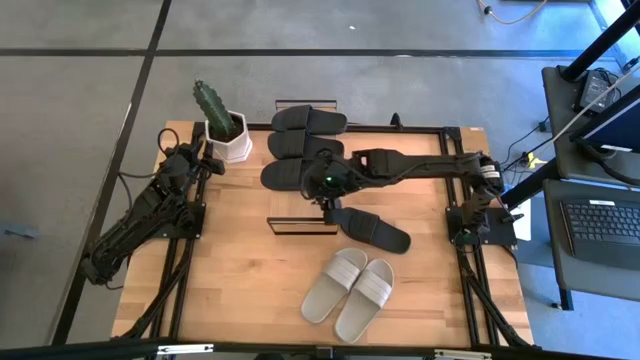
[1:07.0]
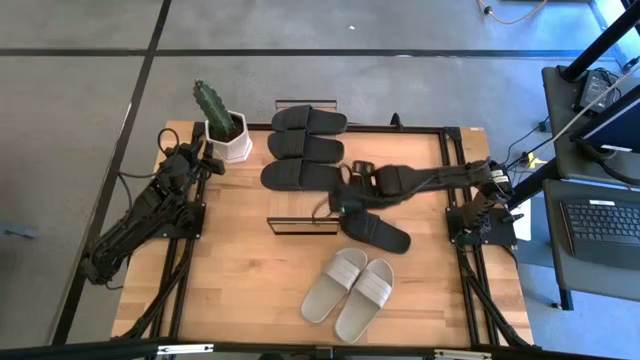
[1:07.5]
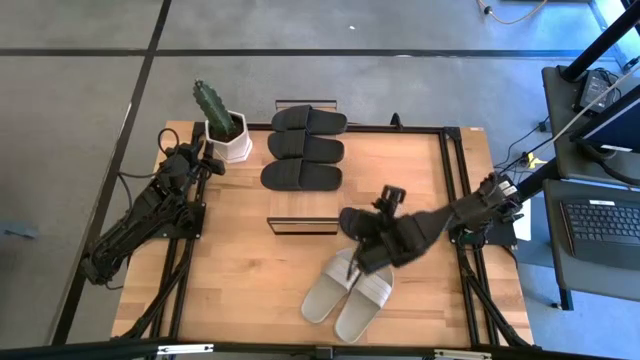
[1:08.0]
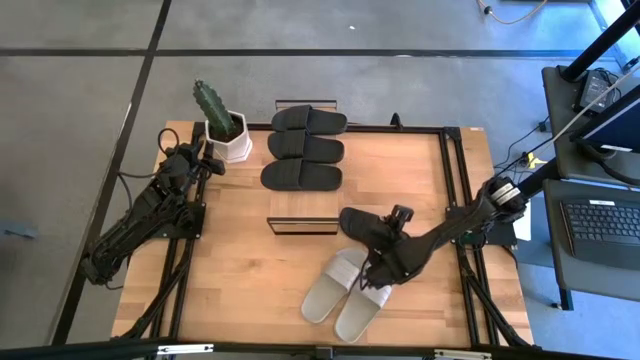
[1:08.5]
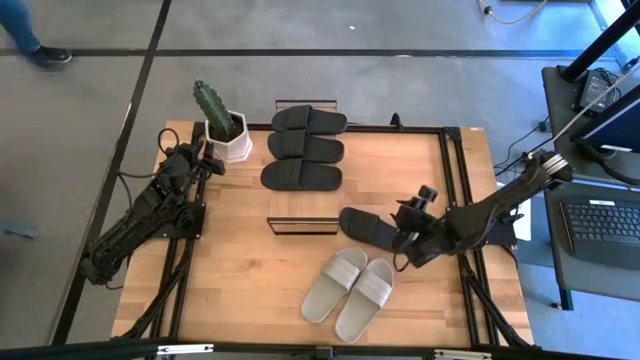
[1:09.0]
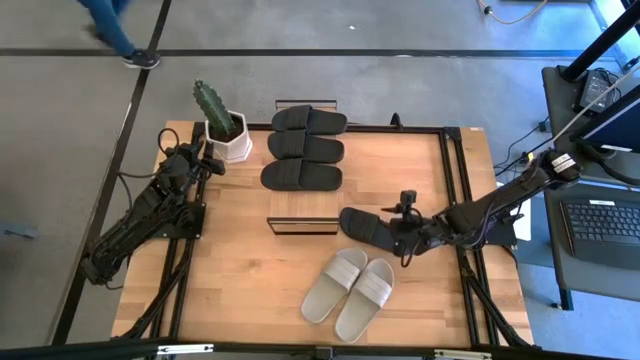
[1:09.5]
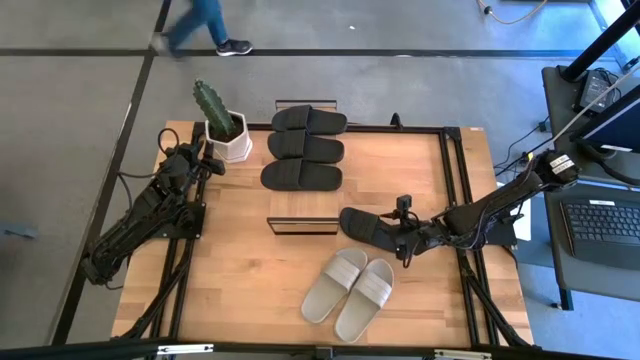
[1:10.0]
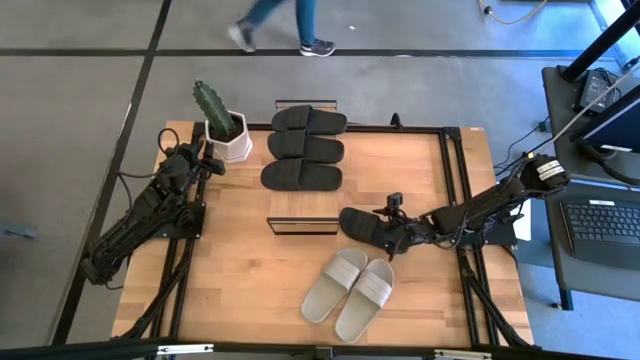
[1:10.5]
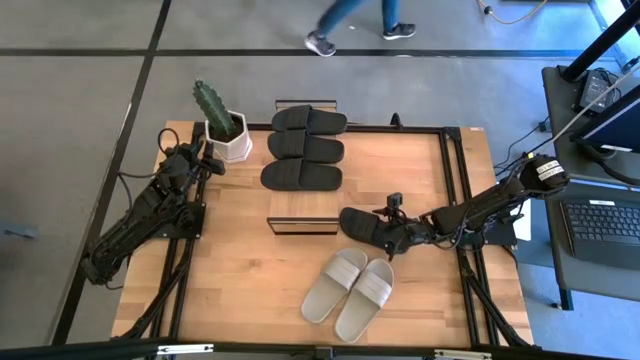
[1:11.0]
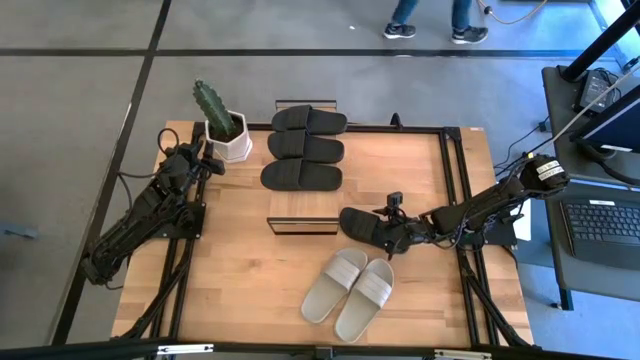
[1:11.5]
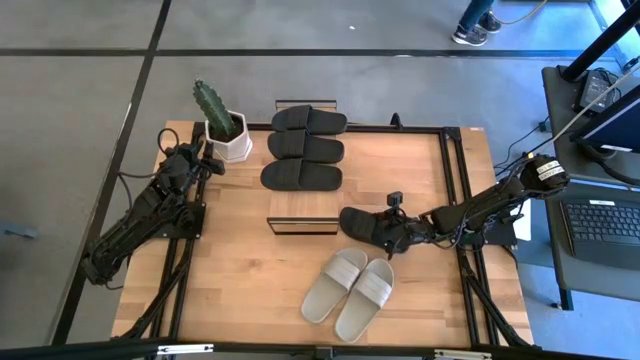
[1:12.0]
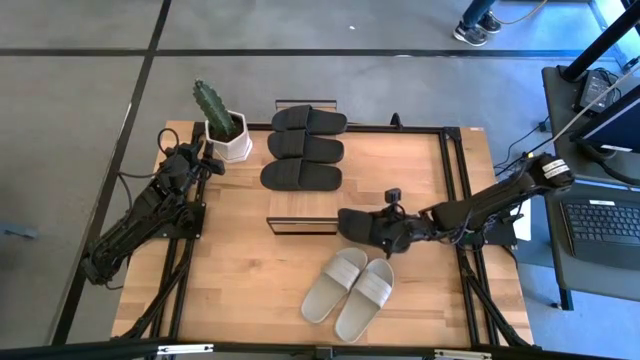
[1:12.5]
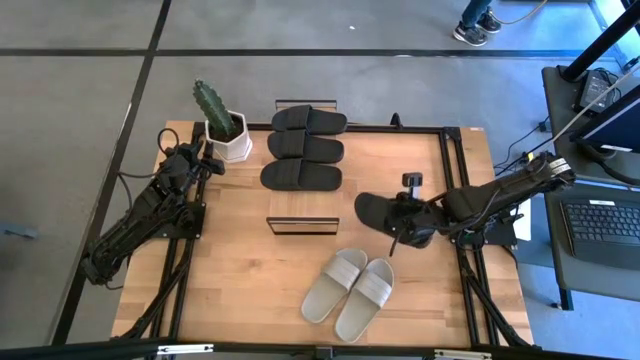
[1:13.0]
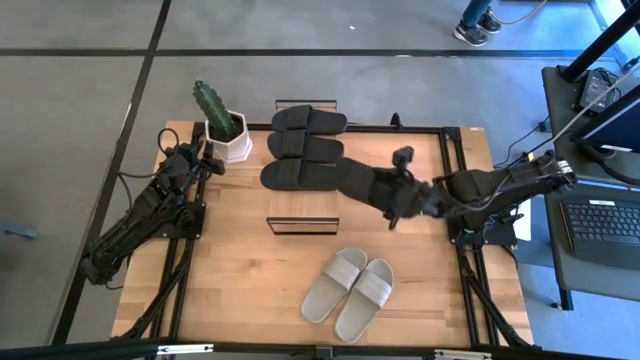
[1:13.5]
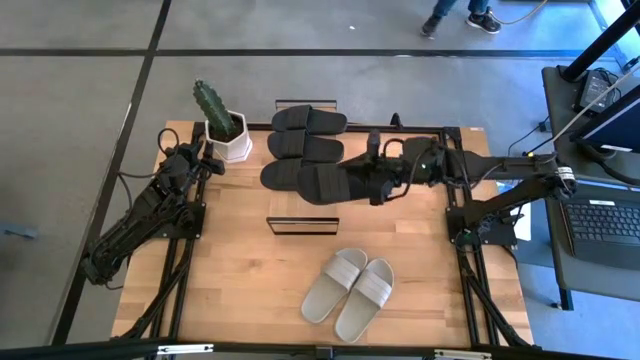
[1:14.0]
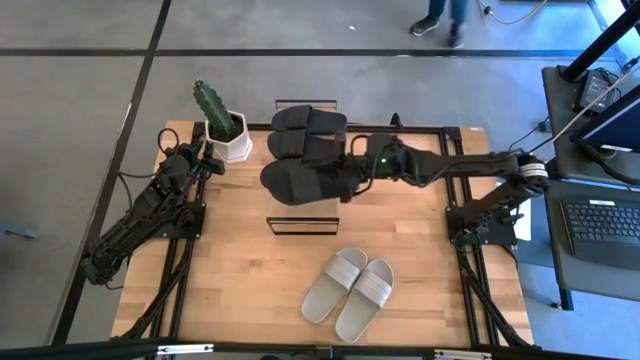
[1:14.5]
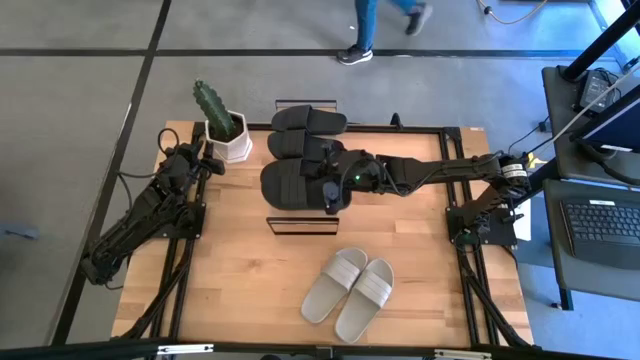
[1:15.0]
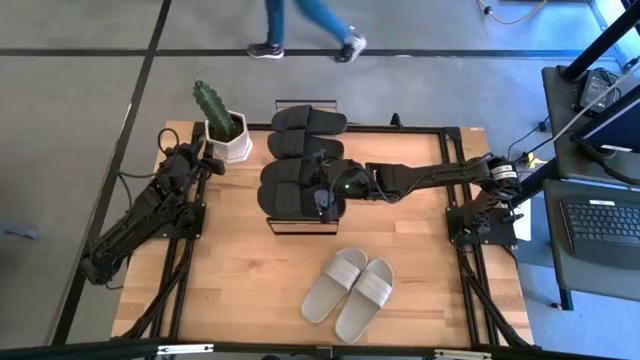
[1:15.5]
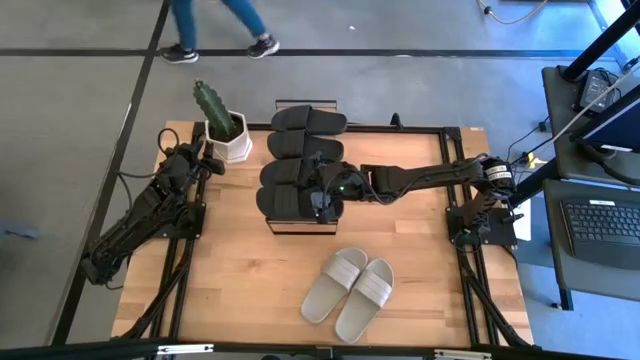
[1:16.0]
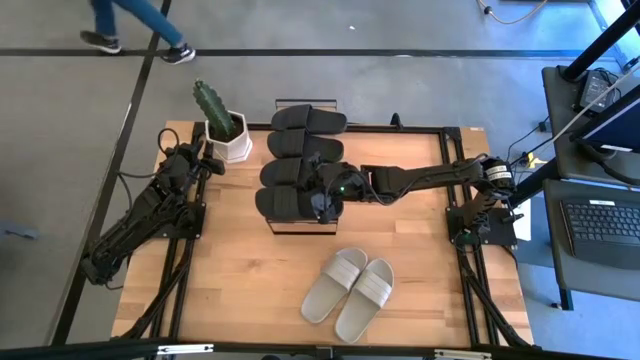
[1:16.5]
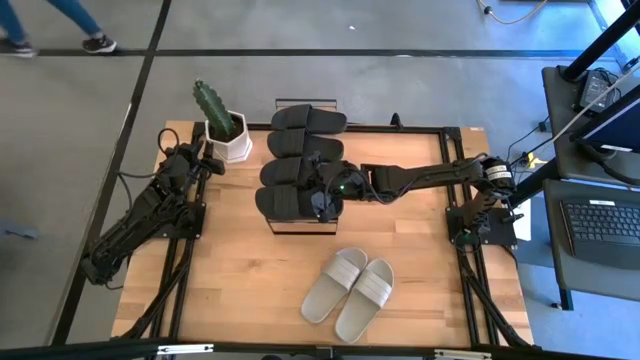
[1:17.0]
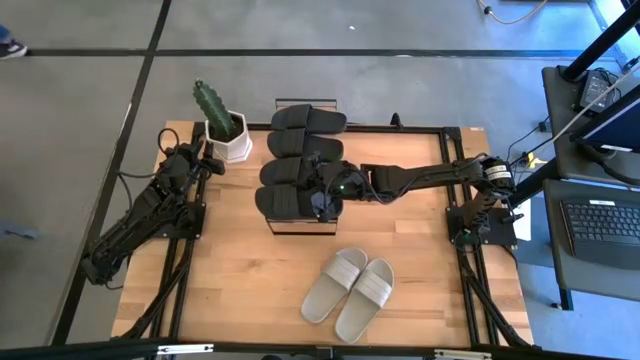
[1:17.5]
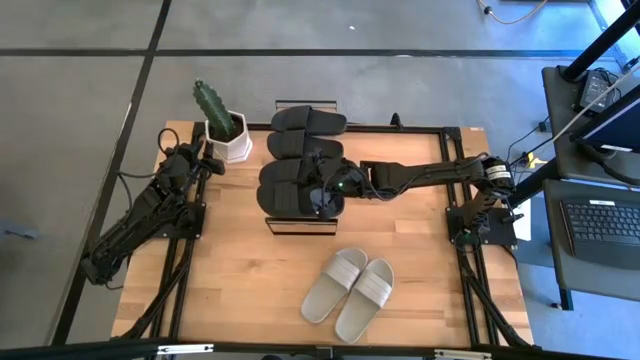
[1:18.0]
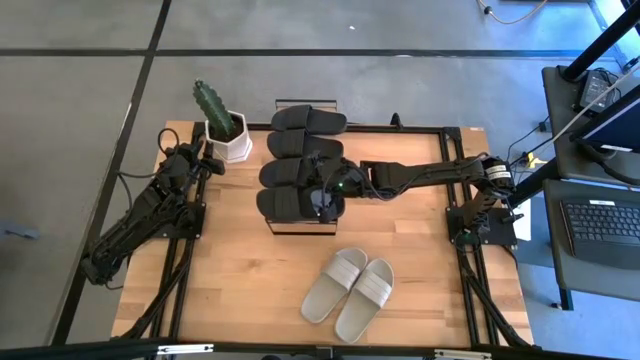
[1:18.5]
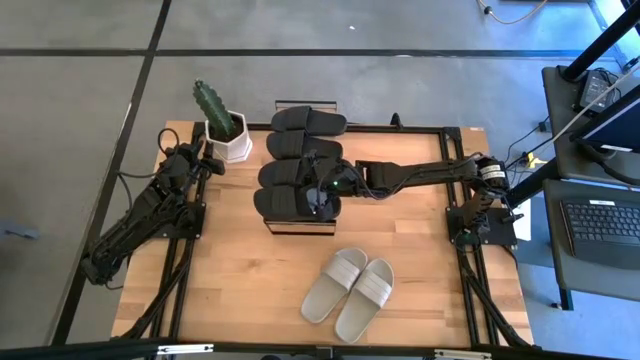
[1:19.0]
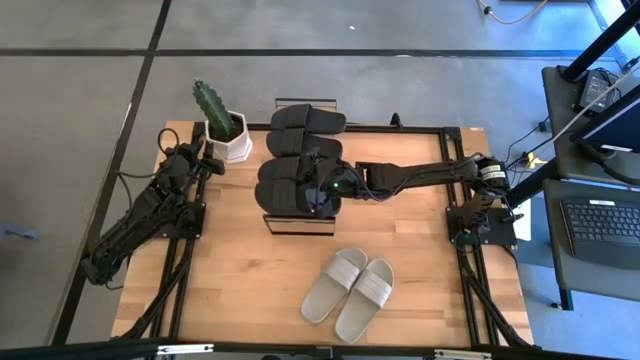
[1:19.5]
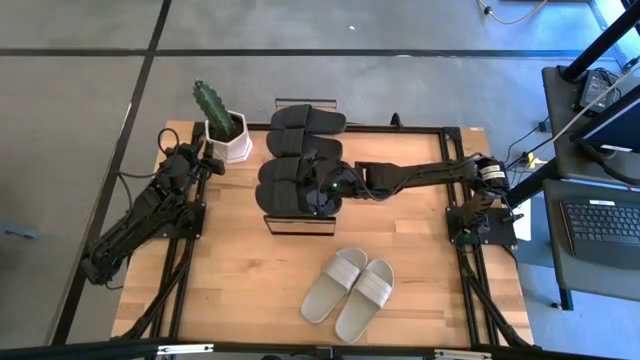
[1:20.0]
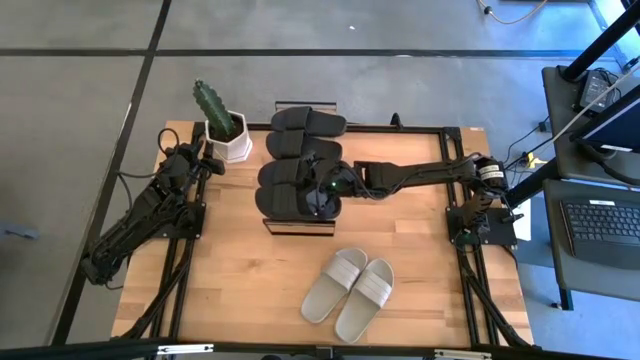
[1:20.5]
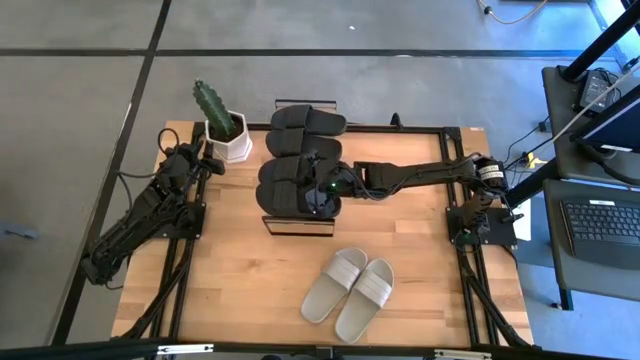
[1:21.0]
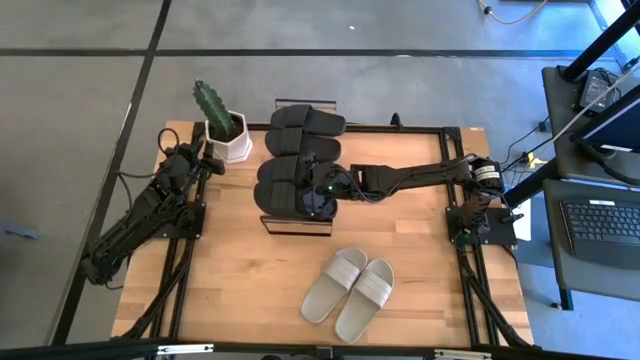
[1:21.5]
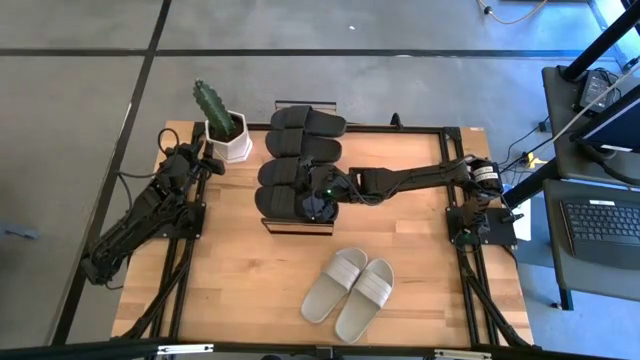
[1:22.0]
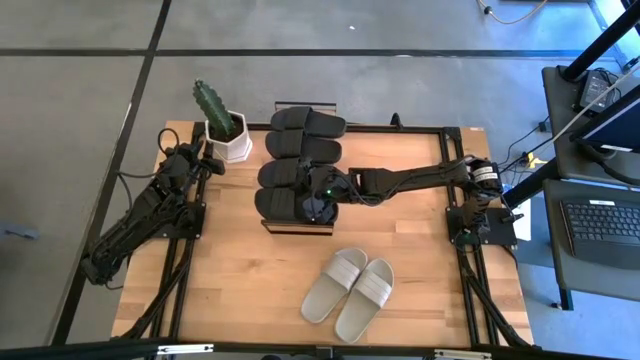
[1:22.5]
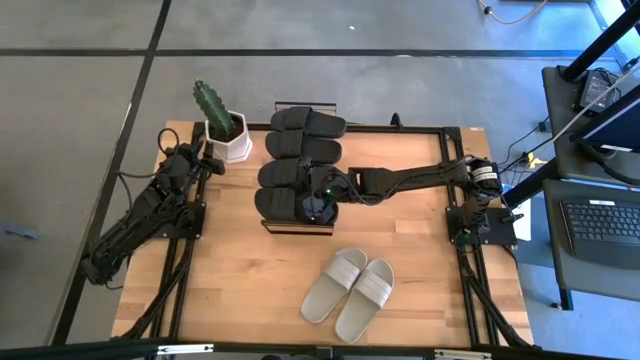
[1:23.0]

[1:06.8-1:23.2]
Task: Pick and place slides into the shelf
Put the black slide on the shelf

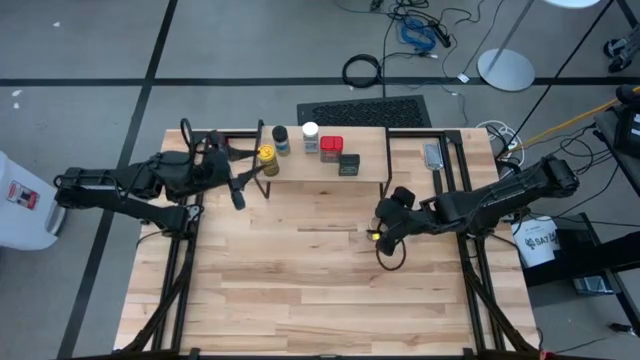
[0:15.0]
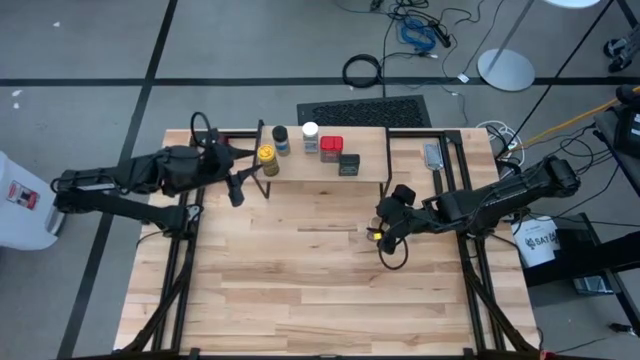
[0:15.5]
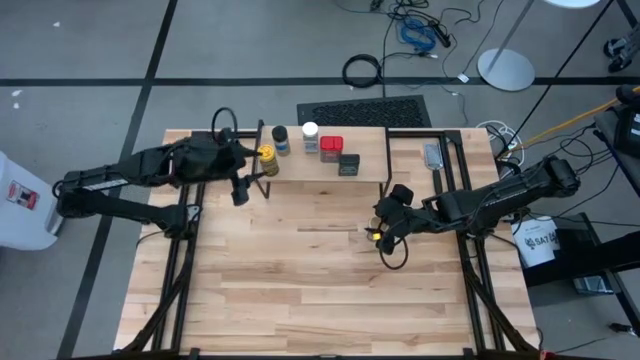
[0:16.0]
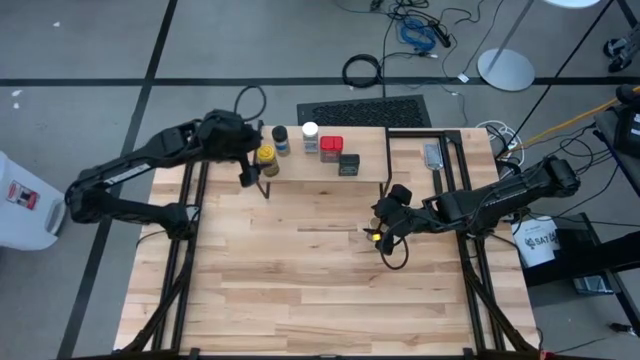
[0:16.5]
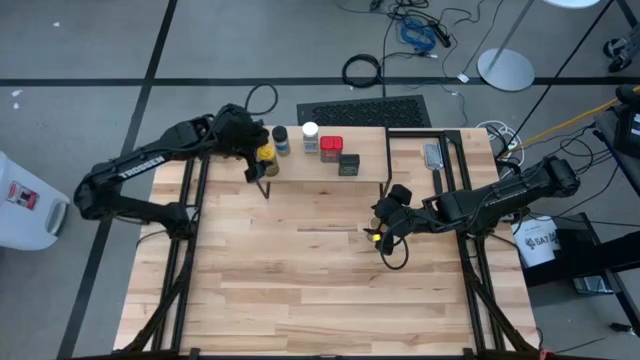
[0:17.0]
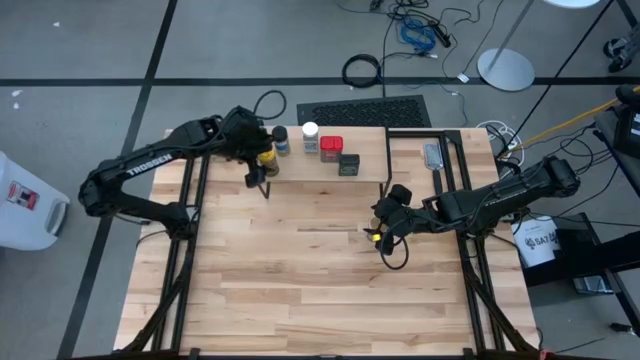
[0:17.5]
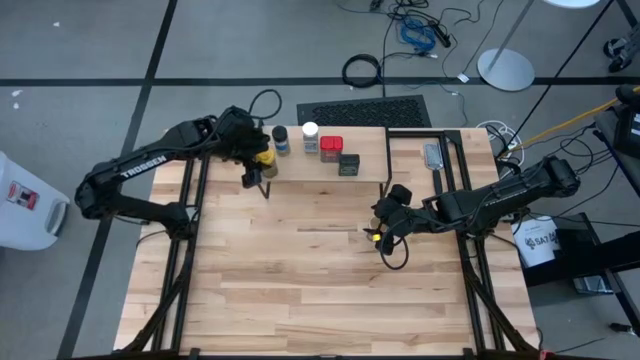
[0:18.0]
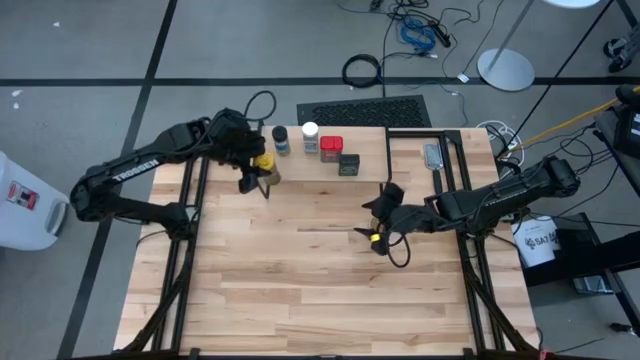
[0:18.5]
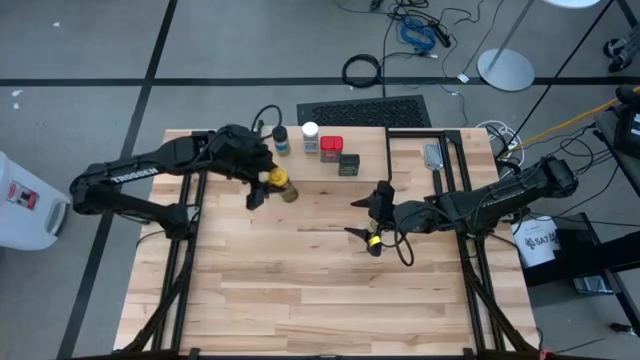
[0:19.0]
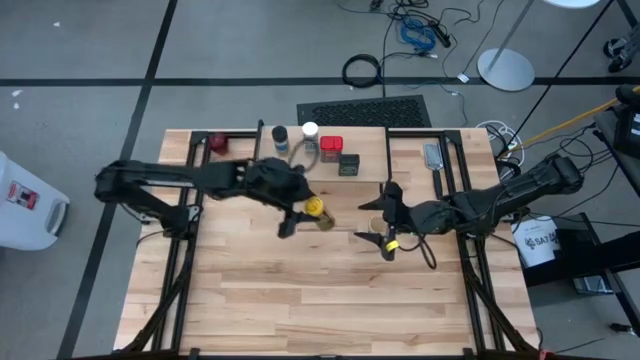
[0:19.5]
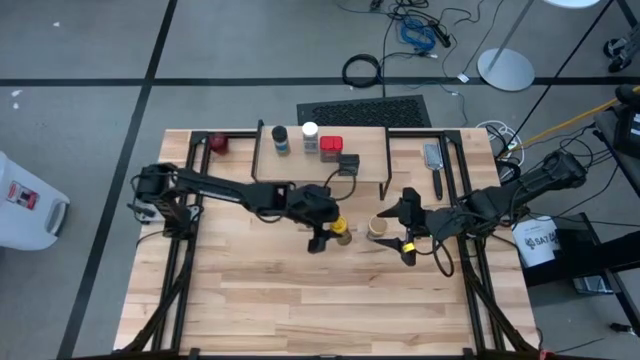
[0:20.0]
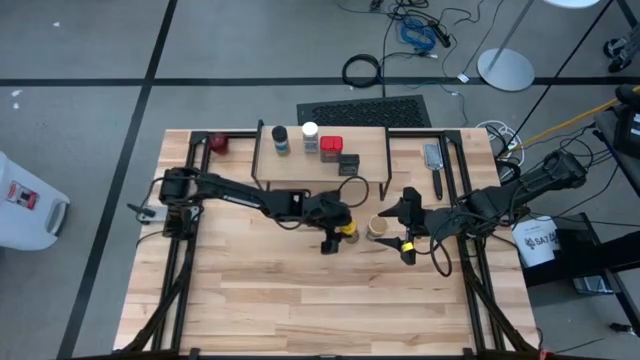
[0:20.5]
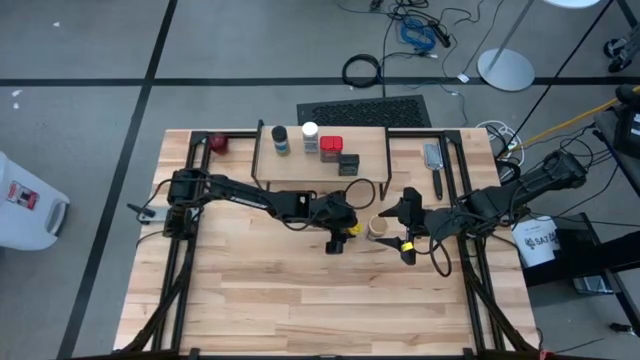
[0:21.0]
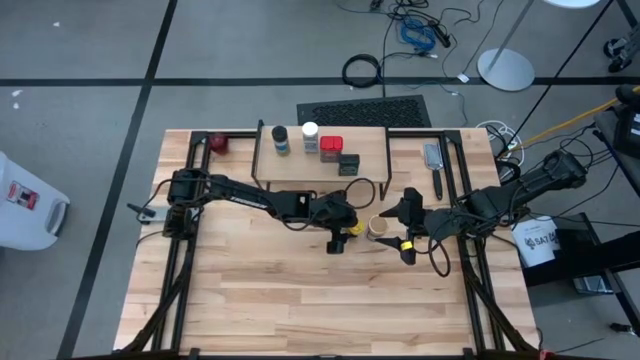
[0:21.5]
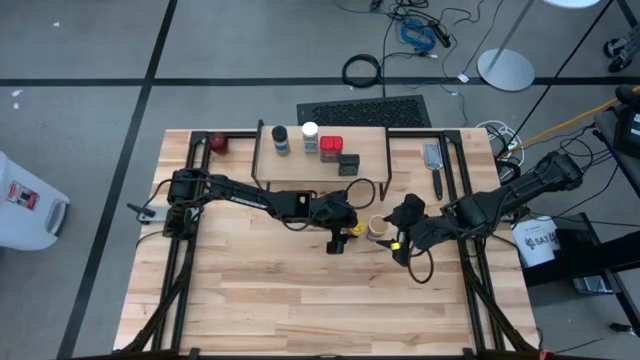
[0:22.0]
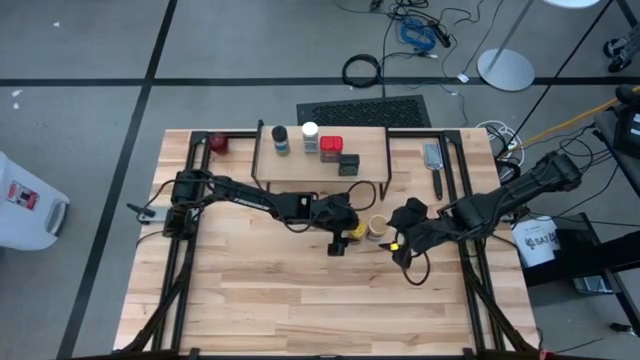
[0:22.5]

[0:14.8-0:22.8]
Task: Shelf spices
Remove the yellow seasoning bottle from the shelf
